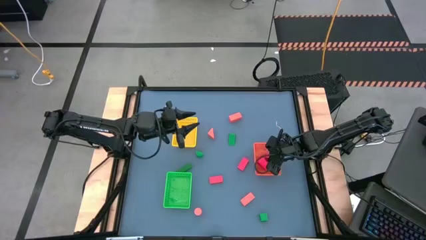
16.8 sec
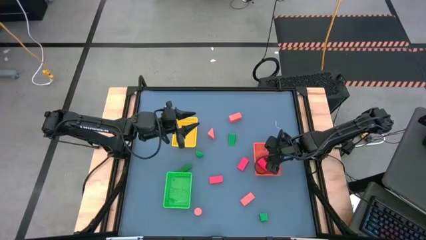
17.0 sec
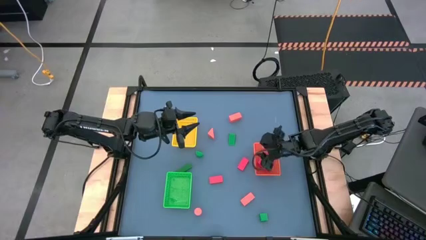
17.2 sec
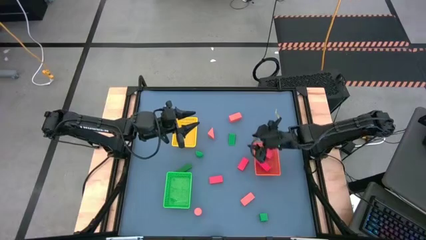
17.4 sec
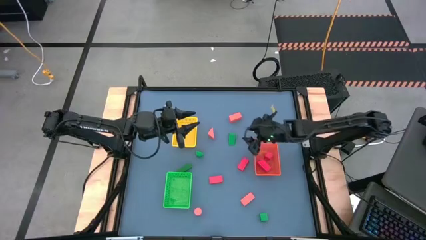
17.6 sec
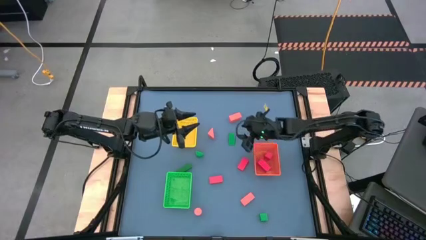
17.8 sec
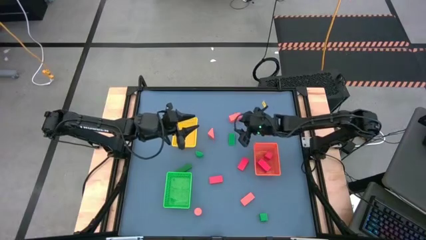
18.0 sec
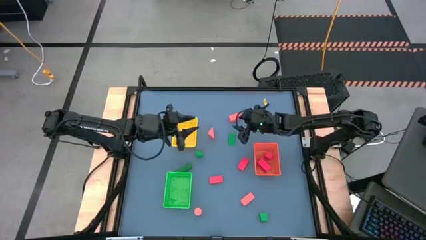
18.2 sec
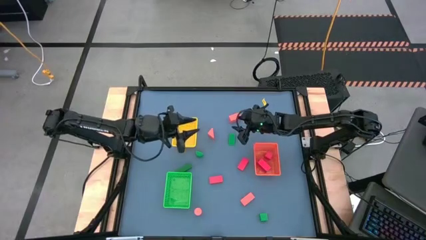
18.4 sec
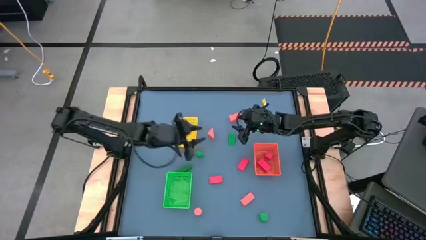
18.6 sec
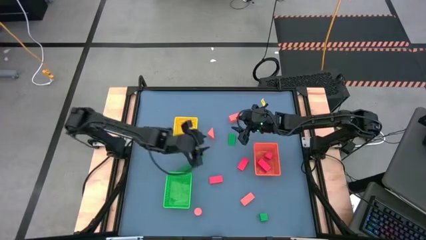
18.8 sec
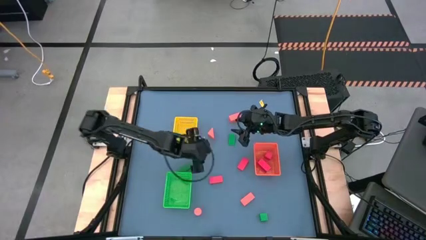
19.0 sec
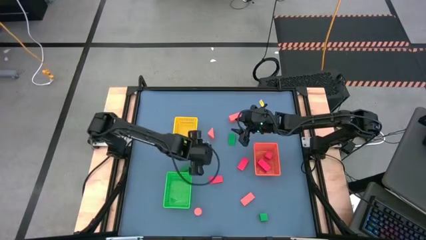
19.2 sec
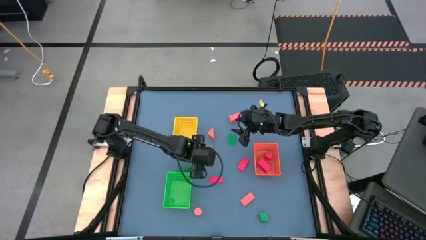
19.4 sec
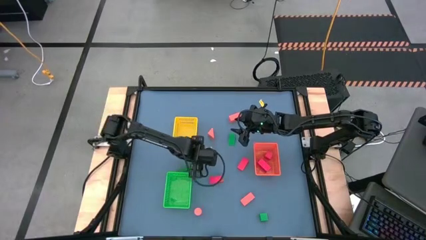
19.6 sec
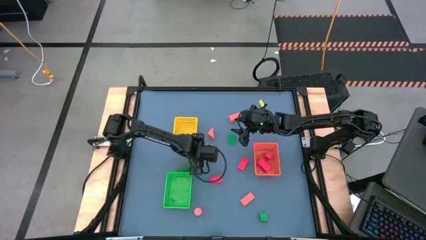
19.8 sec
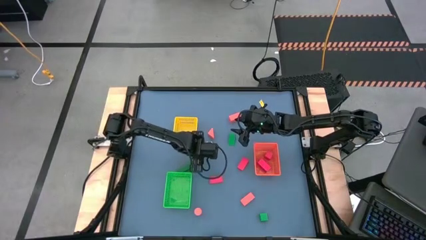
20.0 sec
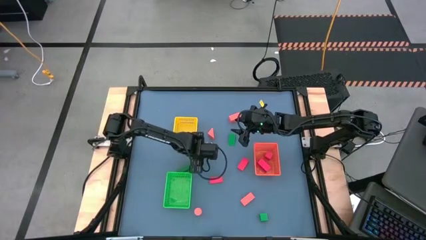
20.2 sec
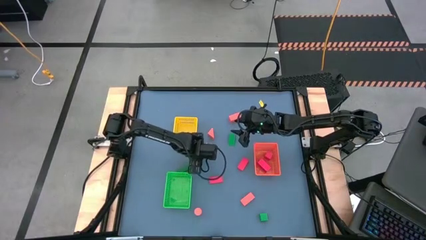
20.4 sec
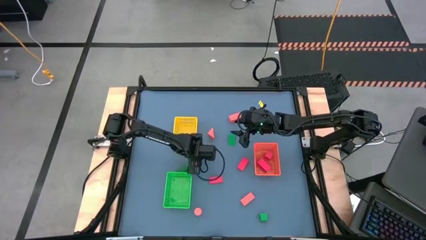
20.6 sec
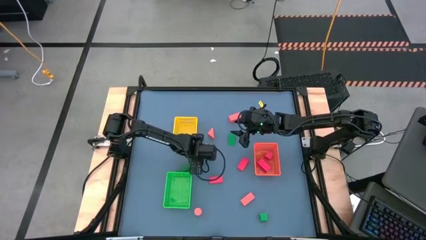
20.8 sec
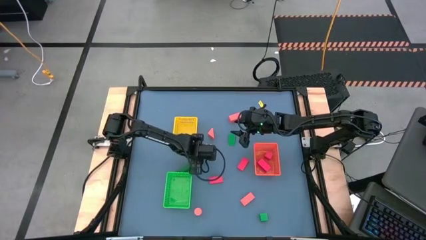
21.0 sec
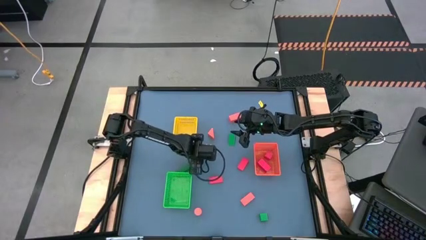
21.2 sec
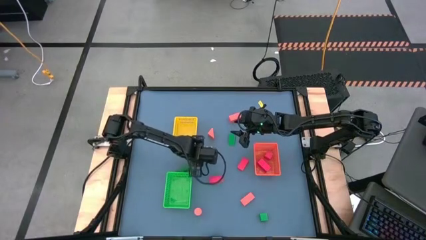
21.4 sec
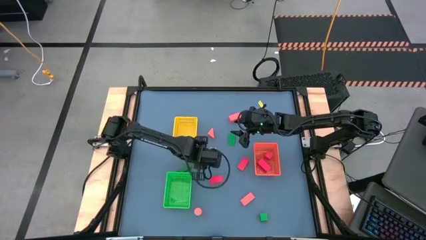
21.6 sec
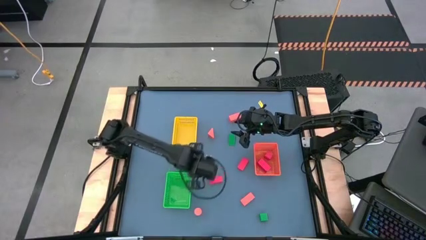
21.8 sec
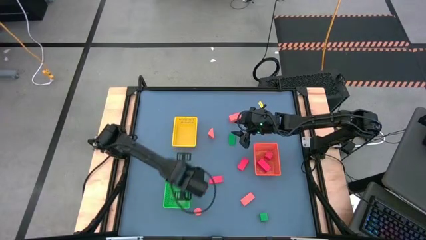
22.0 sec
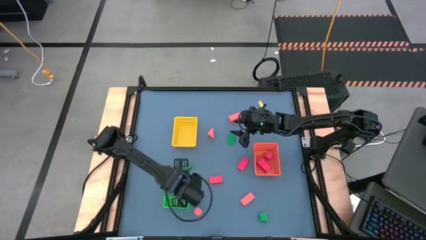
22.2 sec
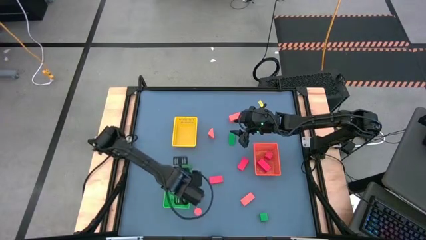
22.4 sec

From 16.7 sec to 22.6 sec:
Task: Sort & place blocks by color
Put the green block into the green bin

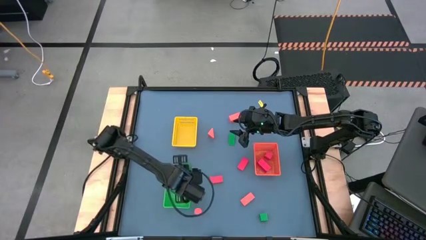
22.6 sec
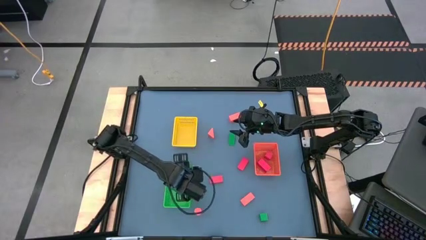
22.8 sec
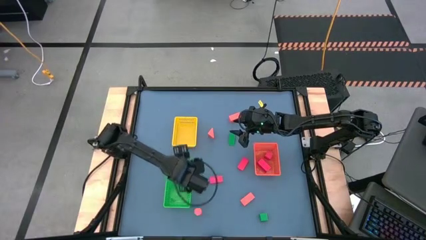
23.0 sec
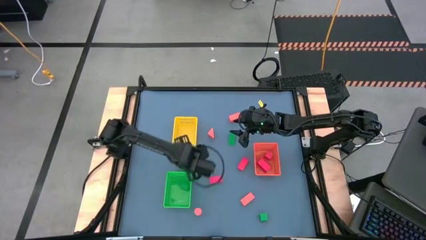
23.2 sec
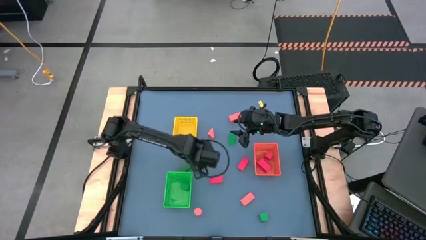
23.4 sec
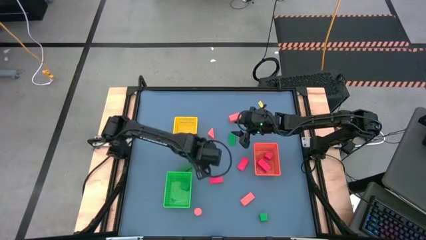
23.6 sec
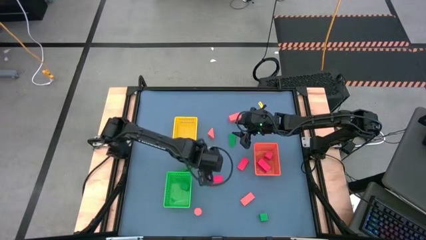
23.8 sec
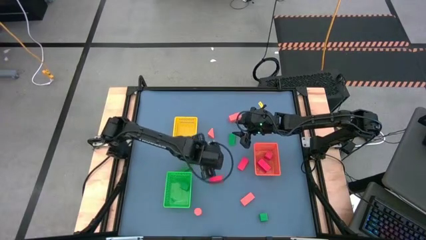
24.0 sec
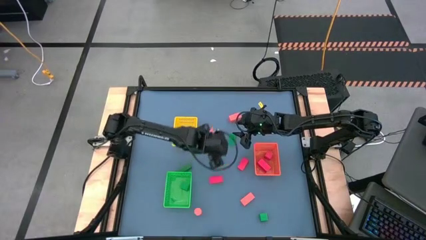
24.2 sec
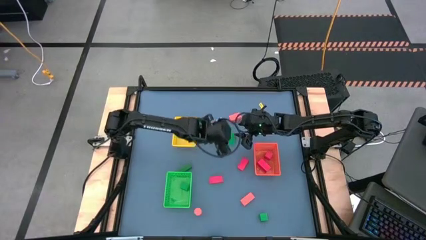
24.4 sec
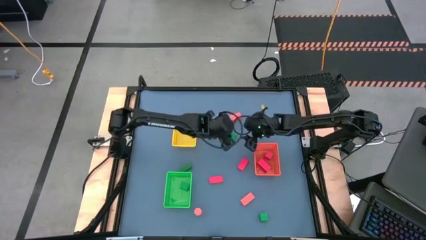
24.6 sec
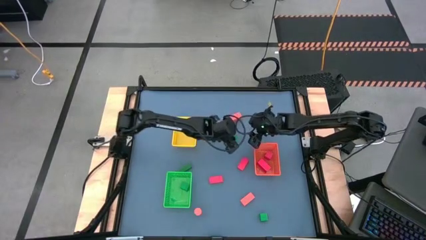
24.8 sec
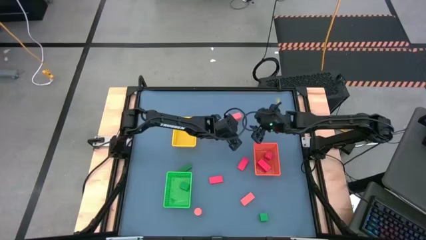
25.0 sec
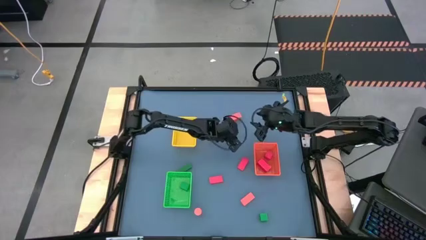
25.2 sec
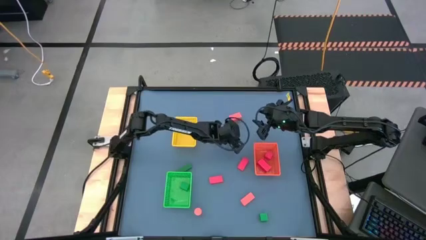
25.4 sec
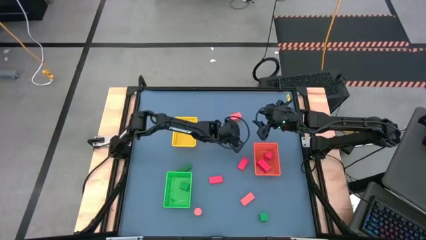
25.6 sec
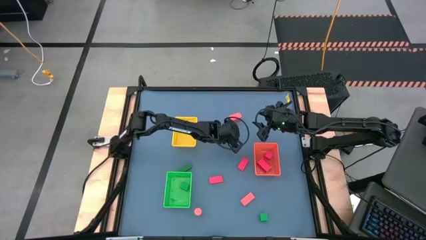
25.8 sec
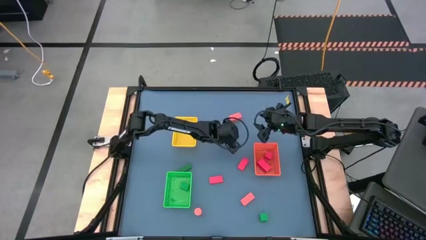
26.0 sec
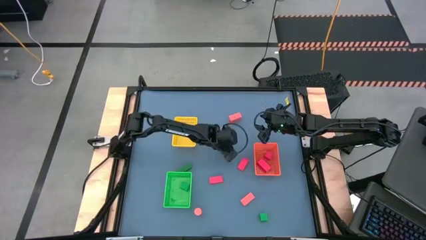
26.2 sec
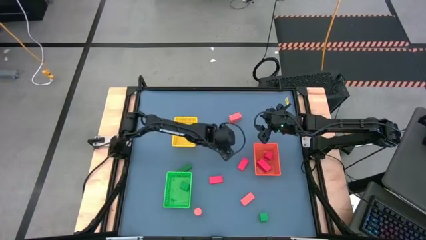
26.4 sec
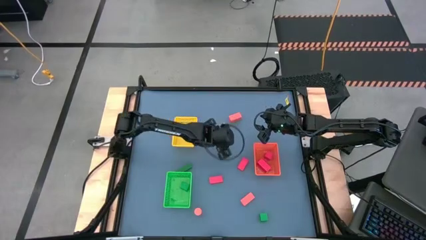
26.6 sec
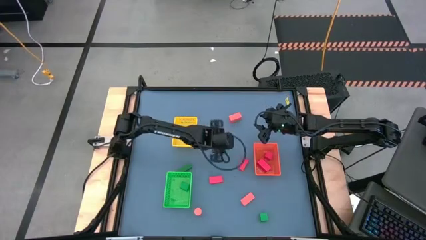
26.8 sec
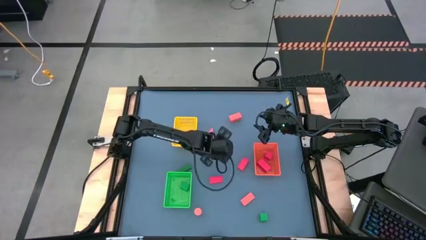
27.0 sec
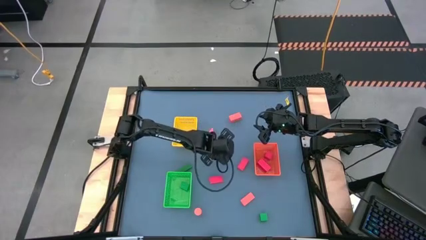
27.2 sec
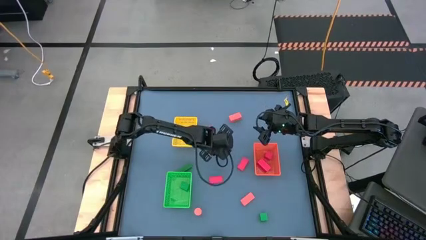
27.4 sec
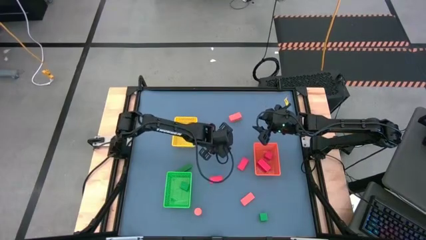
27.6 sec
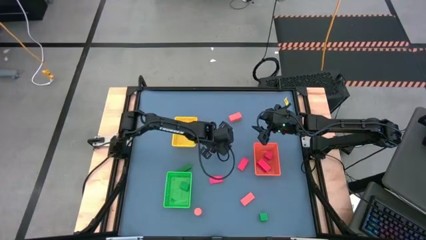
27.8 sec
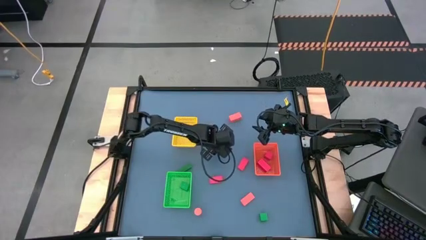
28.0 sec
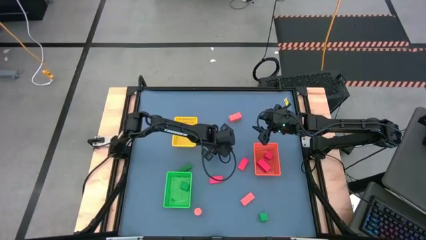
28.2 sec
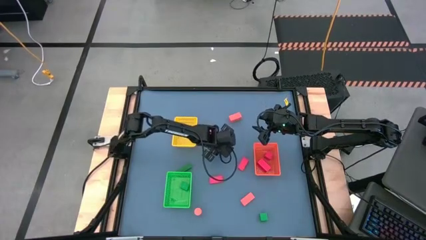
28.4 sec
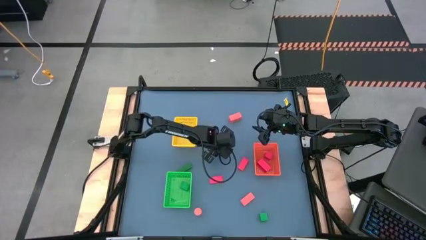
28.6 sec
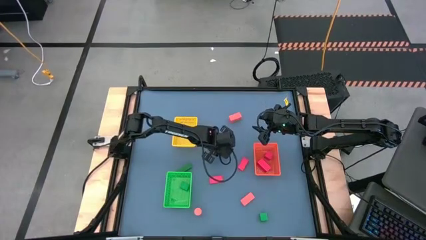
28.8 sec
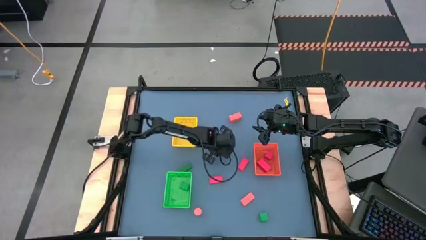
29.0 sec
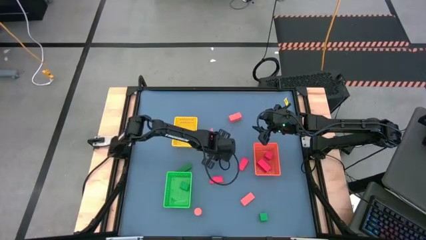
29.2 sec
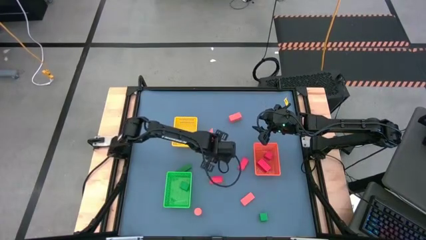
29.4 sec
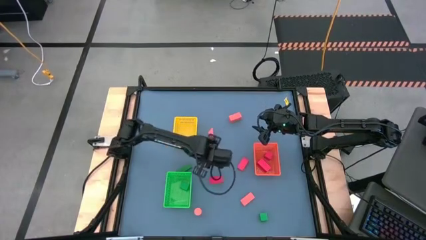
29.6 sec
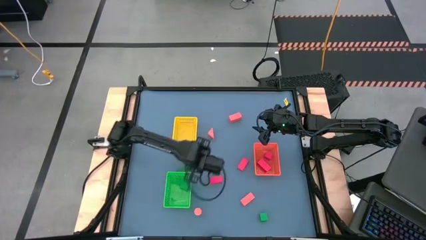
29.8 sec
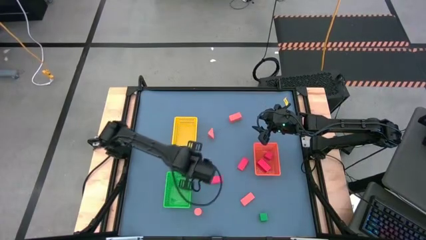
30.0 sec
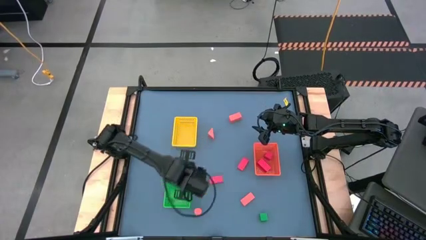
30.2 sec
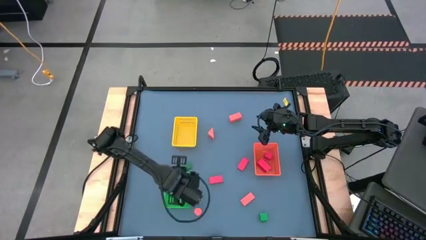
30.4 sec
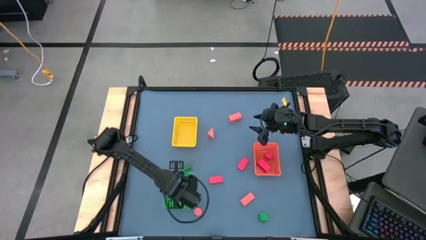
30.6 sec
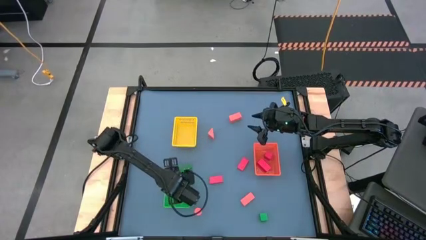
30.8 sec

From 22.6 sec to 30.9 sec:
Put the green block into the green bin

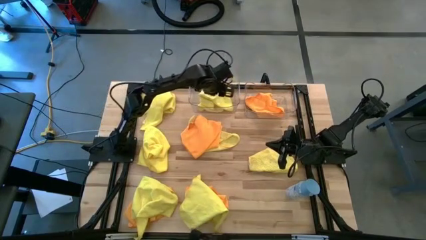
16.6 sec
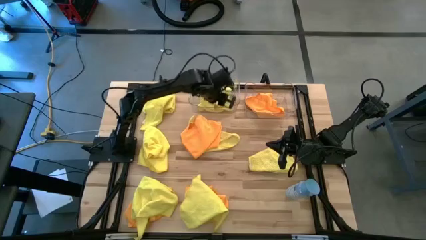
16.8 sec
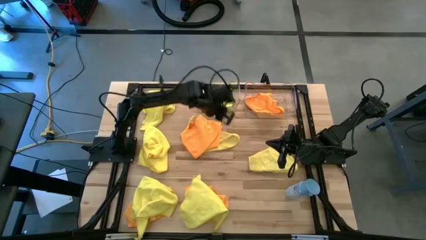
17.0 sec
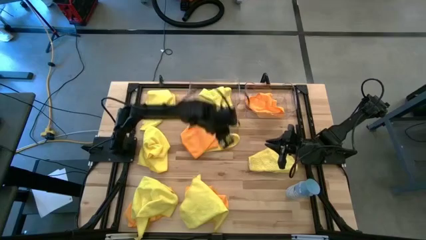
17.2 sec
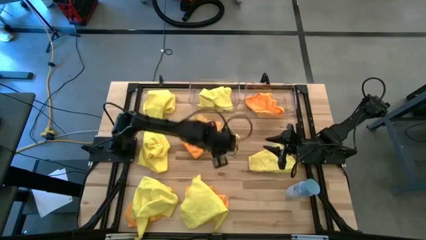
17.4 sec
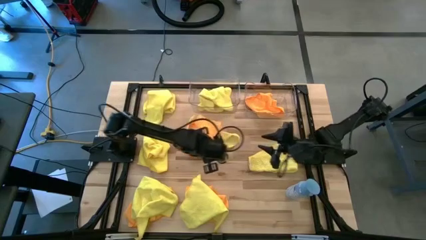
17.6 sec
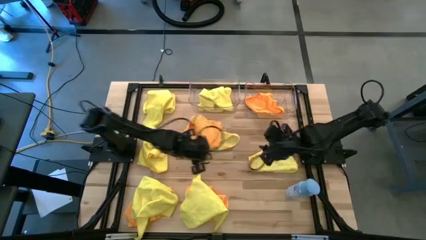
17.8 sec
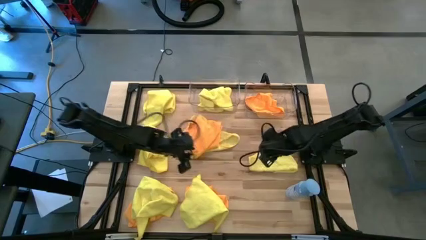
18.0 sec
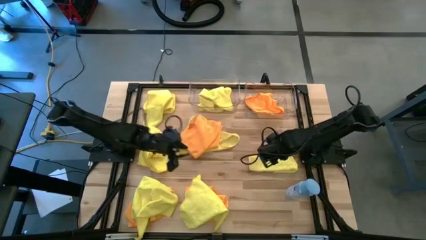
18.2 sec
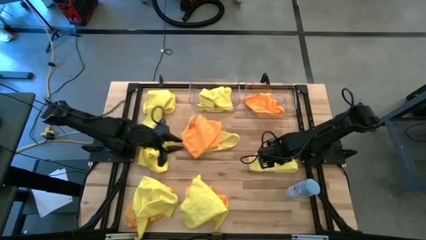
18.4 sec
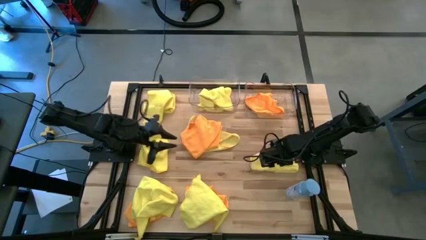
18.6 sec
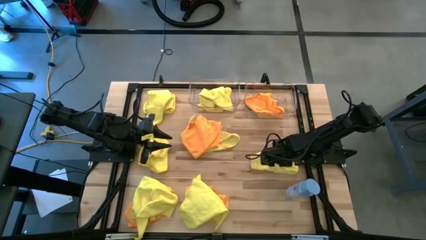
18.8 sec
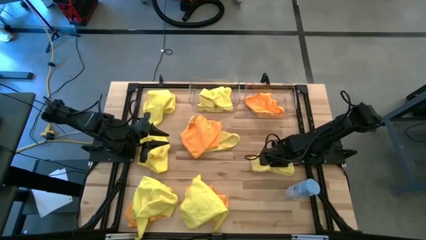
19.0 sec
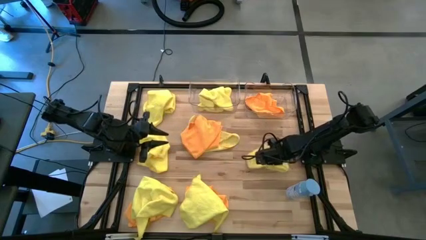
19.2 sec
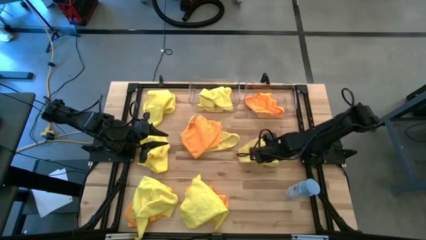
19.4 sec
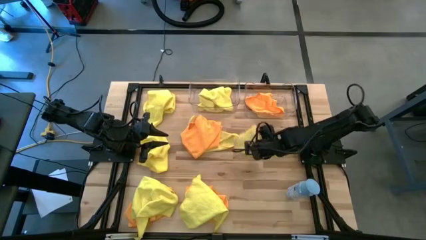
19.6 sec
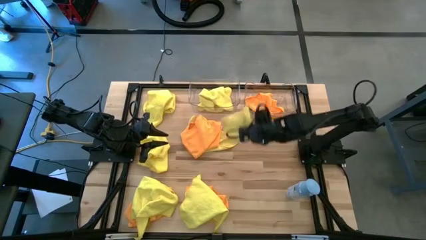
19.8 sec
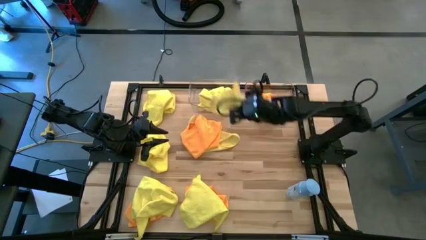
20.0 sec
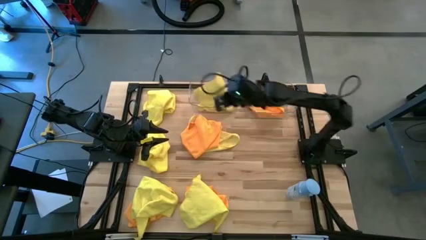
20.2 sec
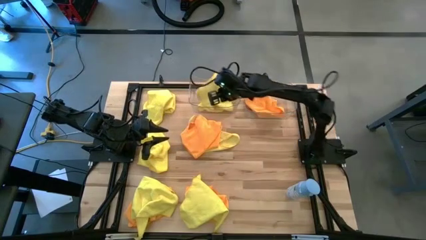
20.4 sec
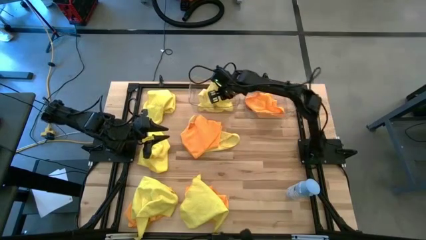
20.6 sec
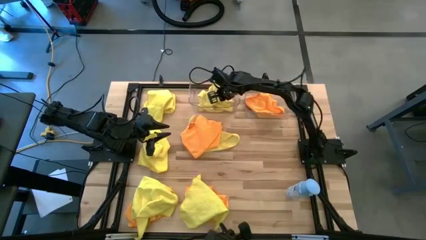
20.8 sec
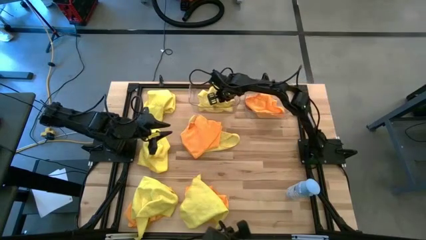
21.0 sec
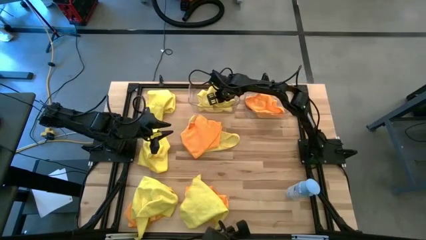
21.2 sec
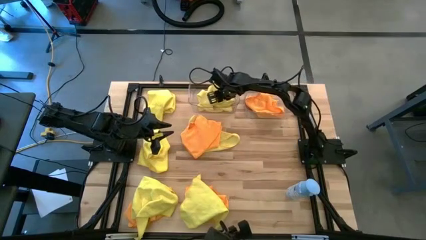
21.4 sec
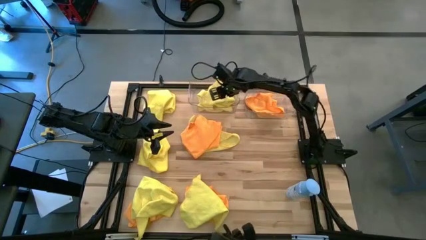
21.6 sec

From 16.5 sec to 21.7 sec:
Task: Sort microfiber towel by color & place in baskets
Put the yellow microfiber cloth into the left transparent bin
